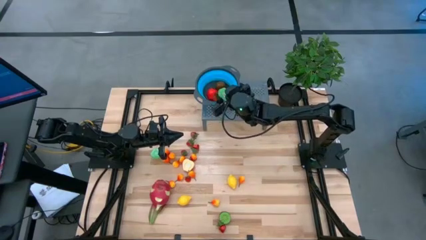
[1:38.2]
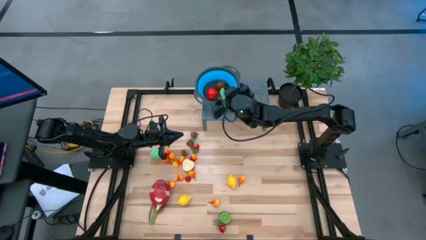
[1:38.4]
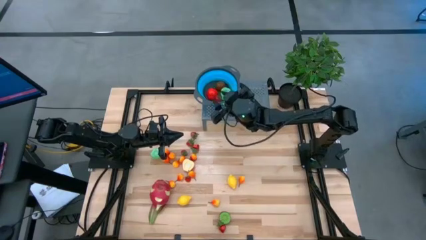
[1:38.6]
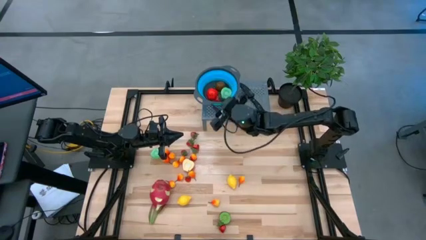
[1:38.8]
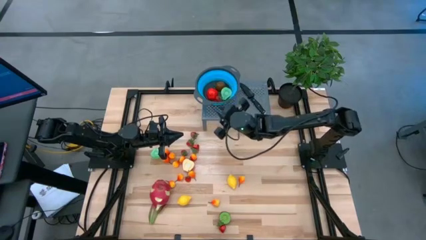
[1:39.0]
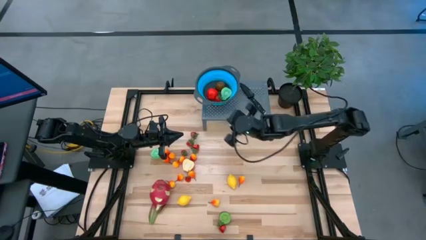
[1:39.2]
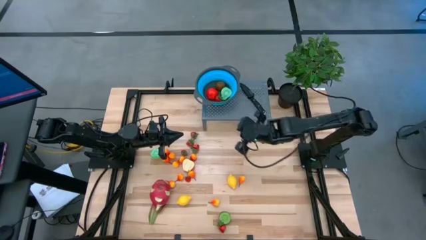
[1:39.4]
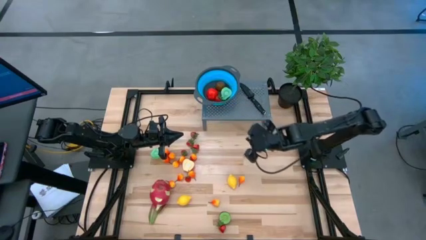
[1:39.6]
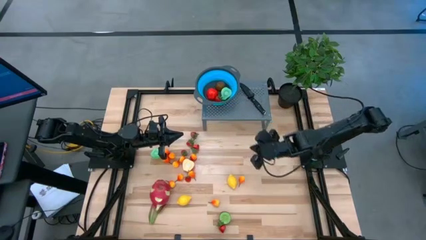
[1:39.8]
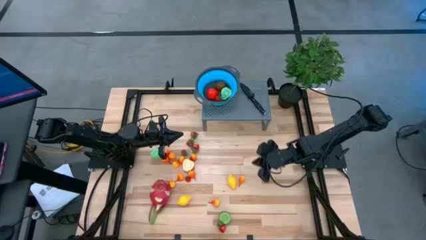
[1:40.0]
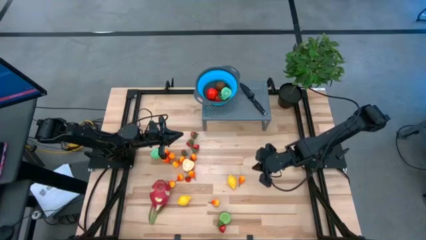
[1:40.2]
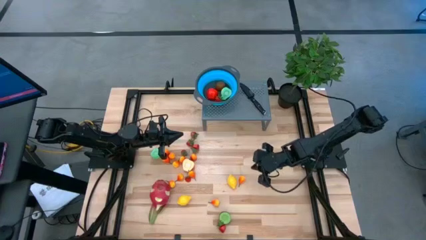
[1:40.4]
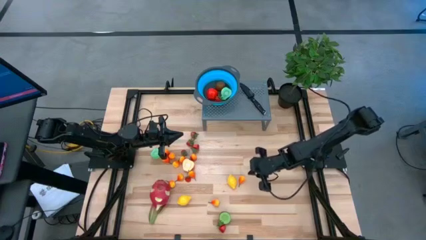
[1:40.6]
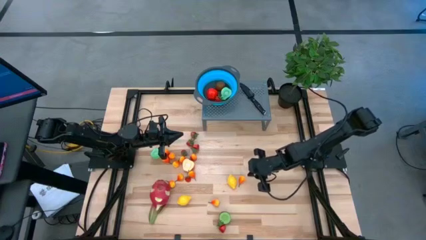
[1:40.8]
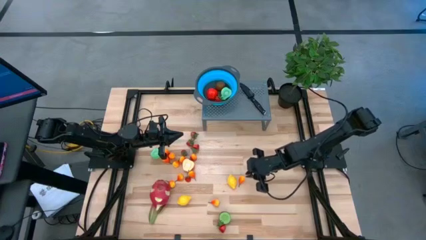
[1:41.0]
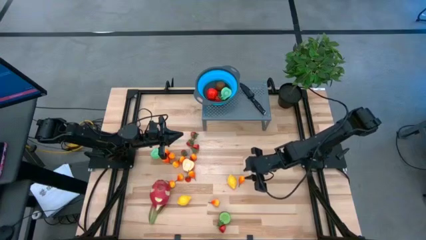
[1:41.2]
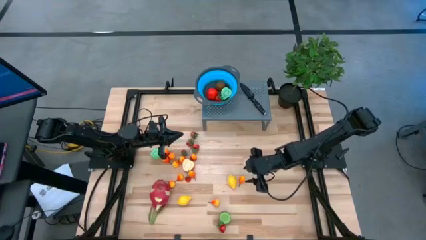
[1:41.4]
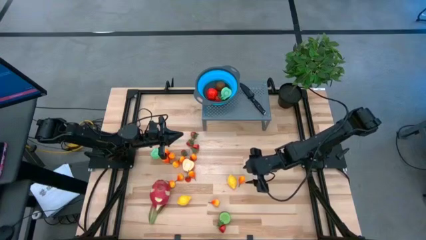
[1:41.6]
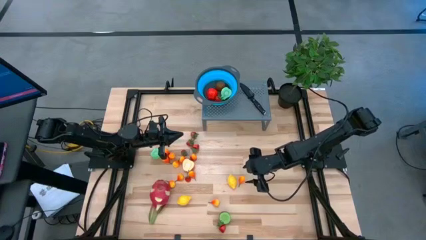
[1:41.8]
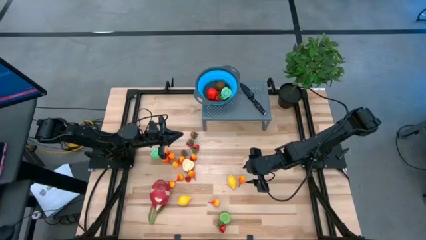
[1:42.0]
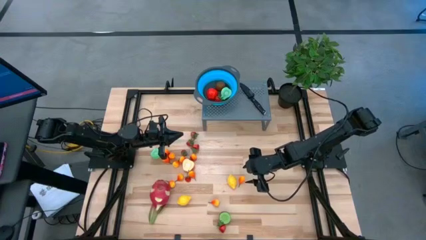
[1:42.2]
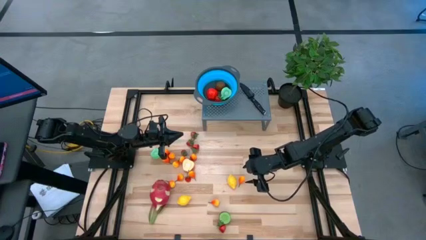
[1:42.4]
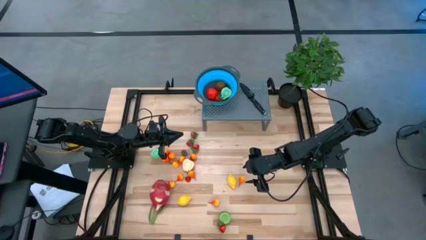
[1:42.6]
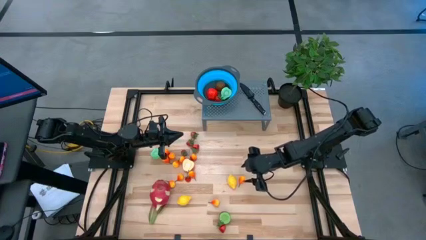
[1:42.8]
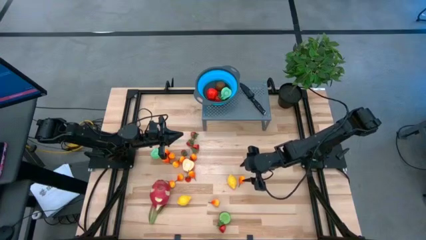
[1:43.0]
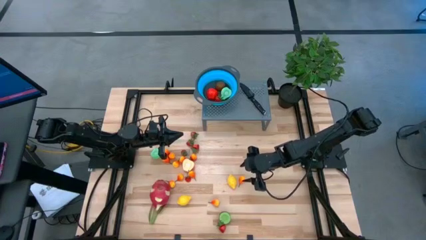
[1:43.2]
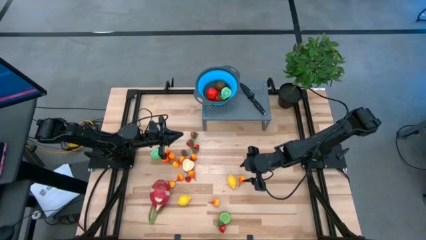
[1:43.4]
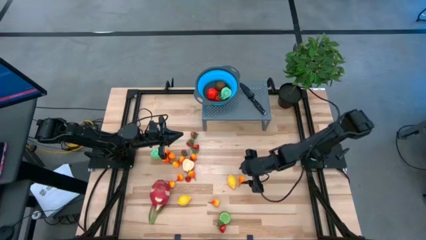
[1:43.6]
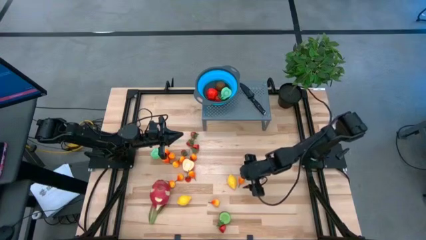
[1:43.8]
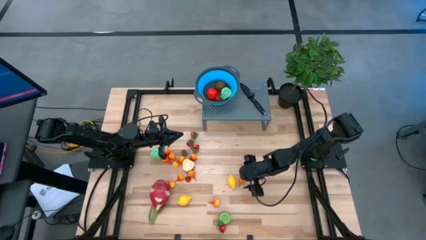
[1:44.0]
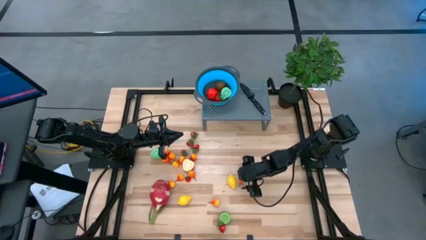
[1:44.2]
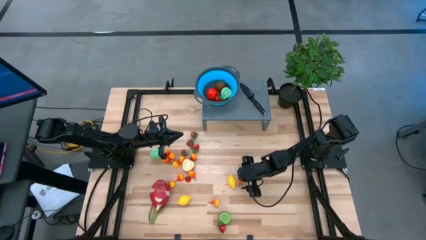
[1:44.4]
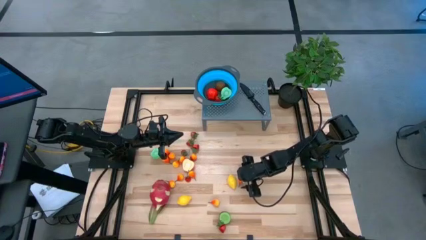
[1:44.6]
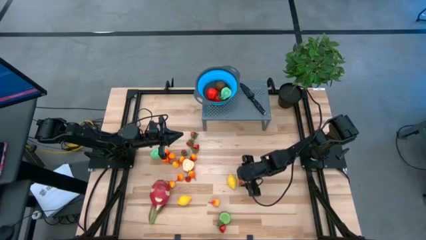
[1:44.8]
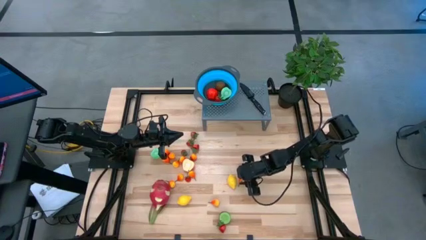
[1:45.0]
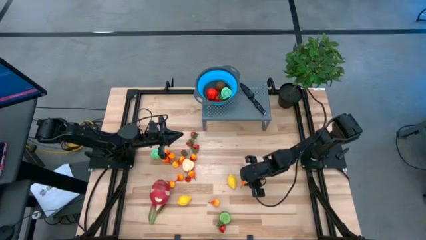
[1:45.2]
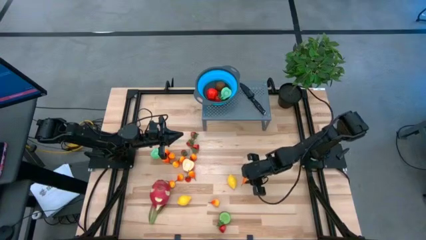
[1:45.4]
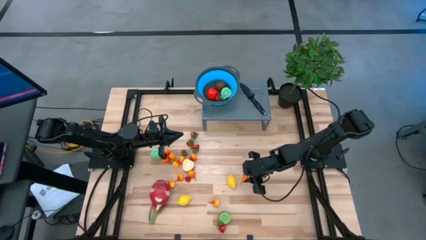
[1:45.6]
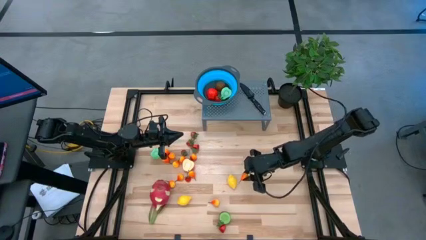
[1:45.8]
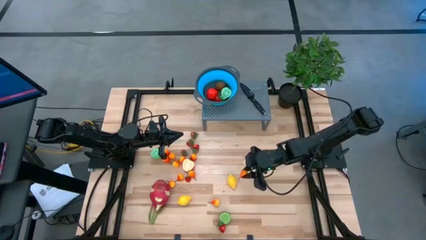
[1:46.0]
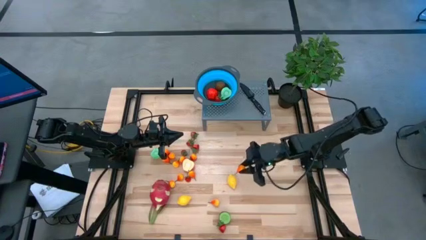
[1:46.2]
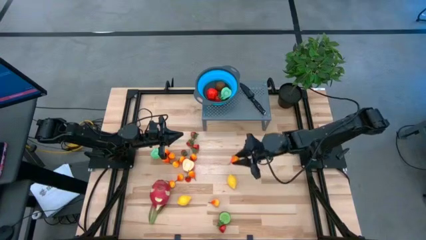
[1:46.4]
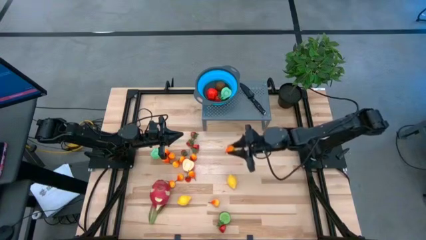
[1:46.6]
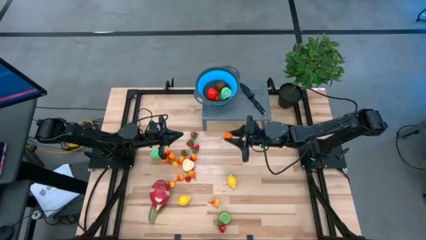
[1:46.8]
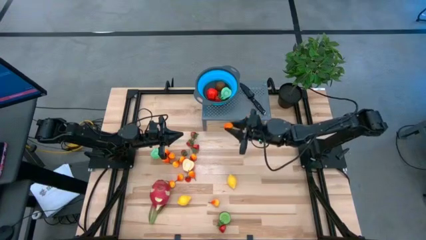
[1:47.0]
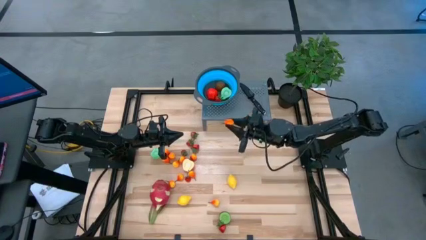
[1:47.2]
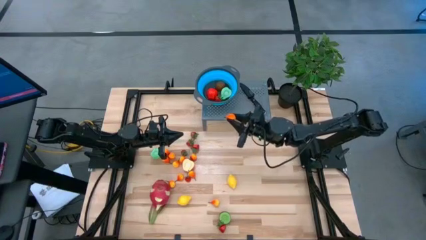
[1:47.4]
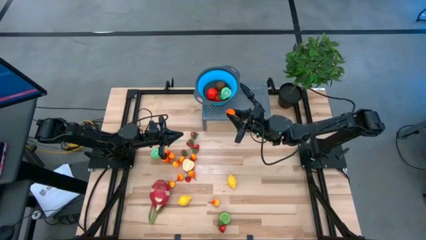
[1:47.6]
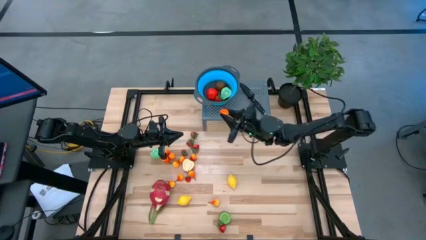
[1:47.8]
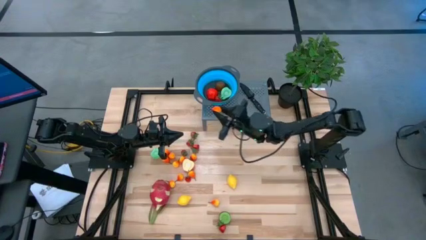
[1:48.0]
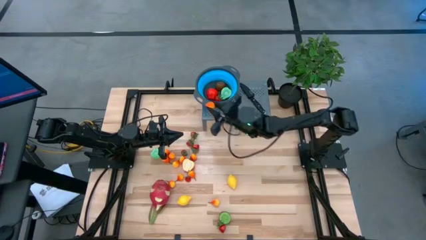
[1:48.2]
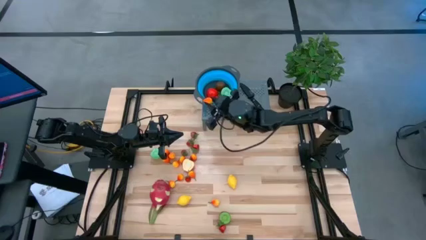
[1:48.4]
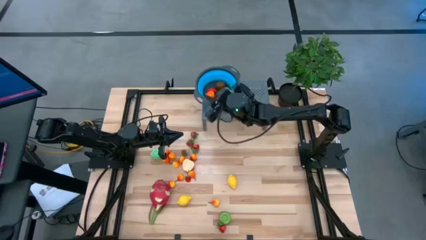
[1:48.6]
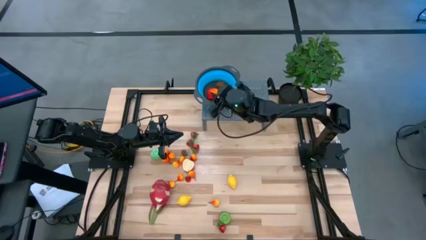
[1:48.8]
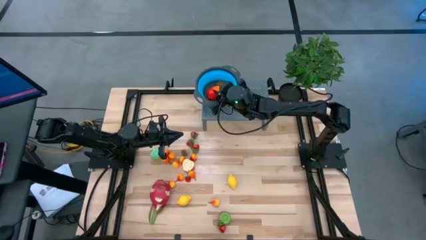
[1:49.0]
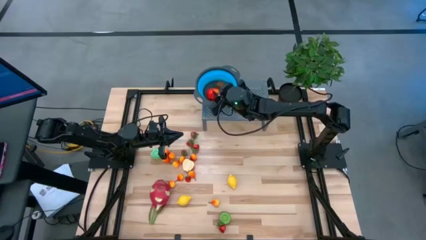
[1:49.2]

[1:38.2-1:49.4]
Task: Pick & Place Fruit
Put the yellow pear into the strainer bowl

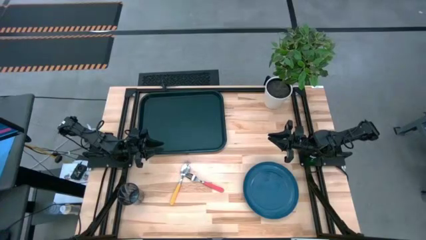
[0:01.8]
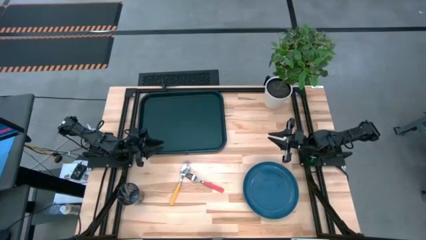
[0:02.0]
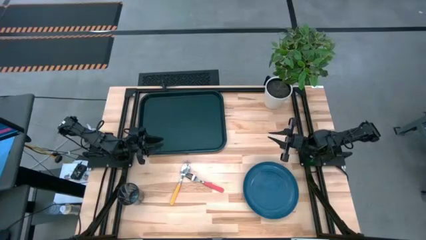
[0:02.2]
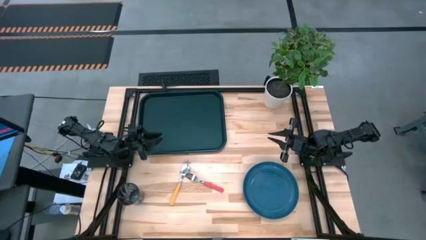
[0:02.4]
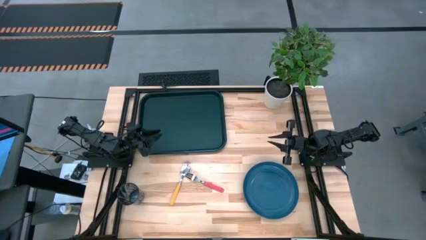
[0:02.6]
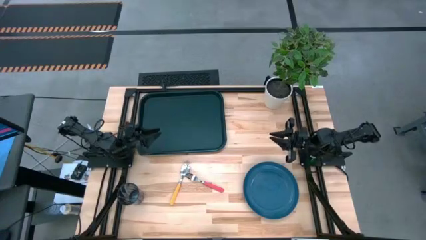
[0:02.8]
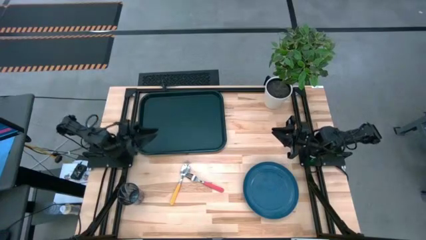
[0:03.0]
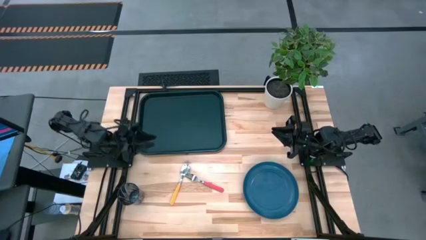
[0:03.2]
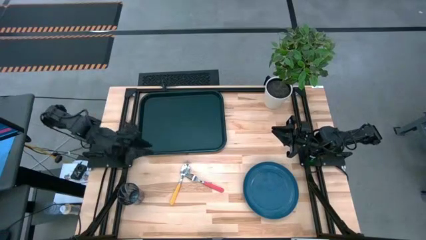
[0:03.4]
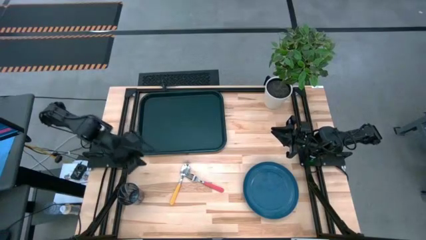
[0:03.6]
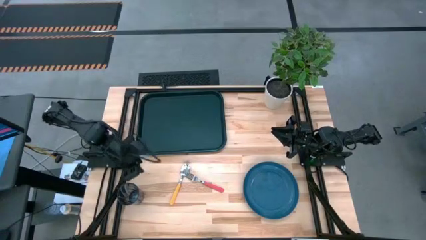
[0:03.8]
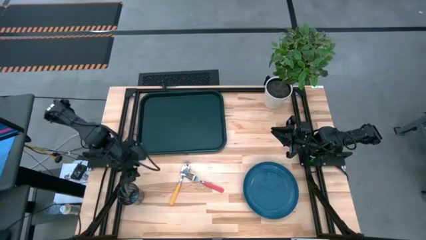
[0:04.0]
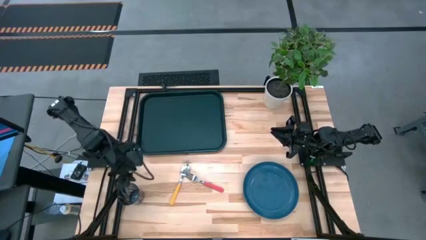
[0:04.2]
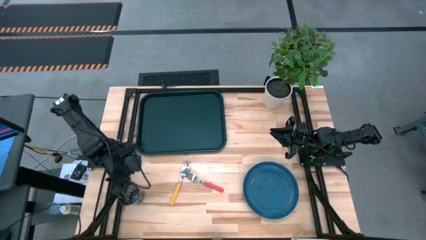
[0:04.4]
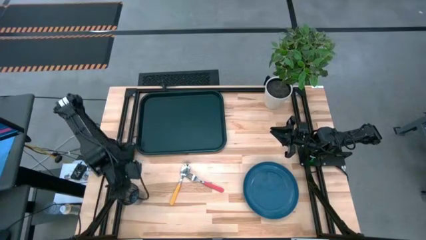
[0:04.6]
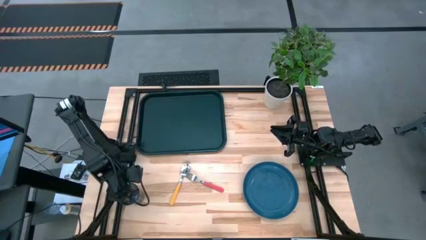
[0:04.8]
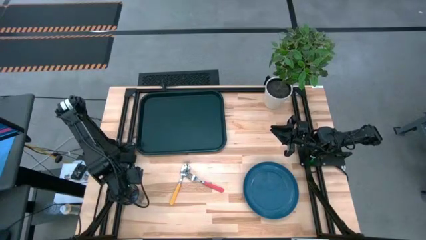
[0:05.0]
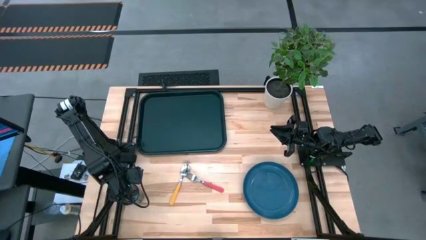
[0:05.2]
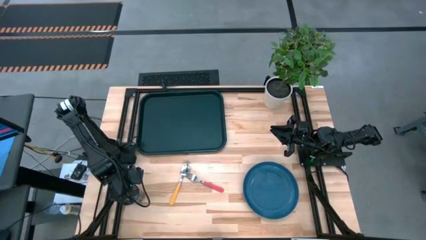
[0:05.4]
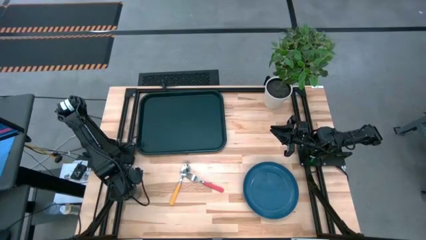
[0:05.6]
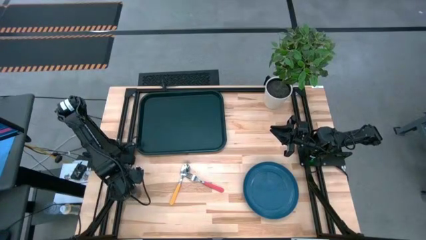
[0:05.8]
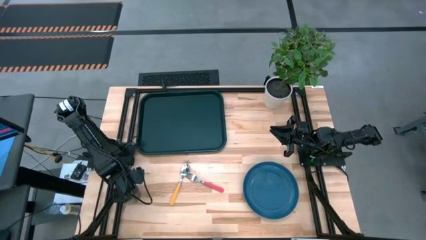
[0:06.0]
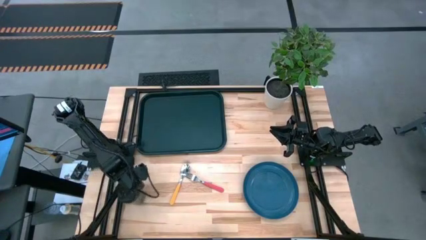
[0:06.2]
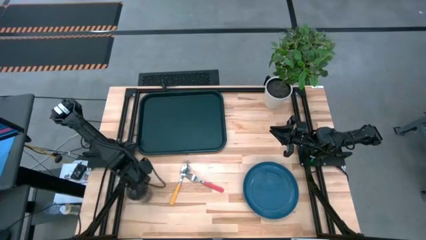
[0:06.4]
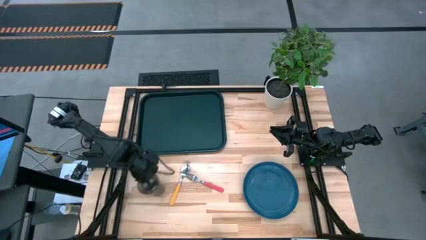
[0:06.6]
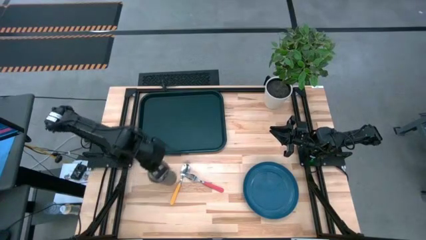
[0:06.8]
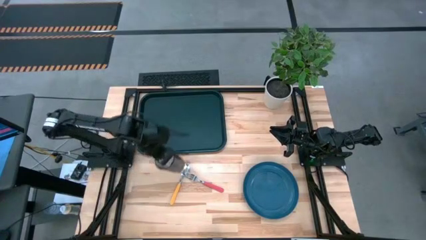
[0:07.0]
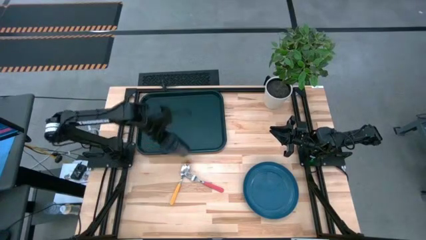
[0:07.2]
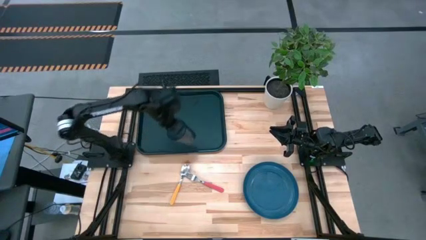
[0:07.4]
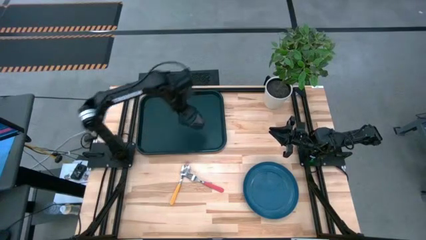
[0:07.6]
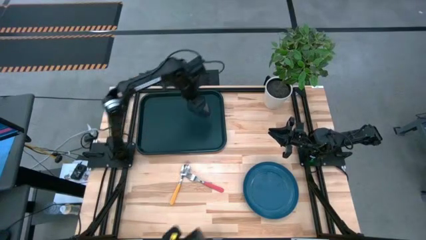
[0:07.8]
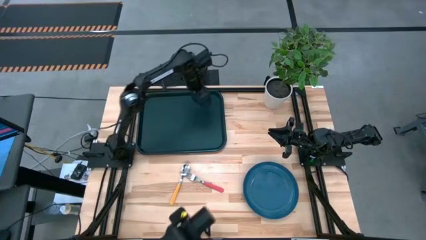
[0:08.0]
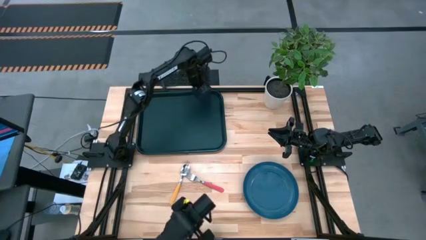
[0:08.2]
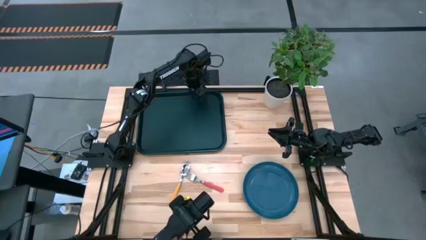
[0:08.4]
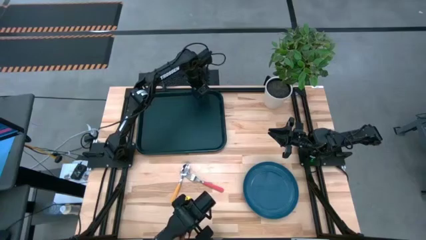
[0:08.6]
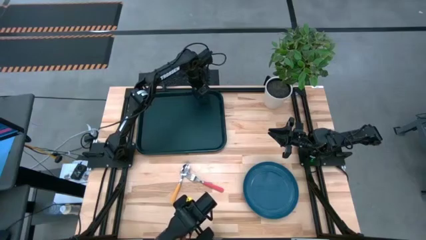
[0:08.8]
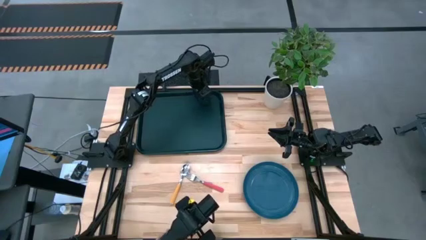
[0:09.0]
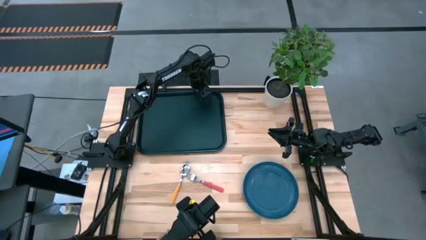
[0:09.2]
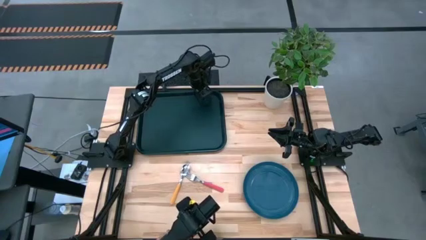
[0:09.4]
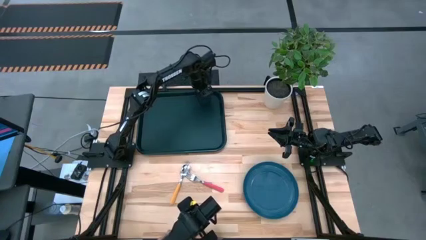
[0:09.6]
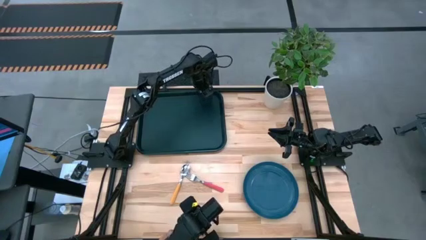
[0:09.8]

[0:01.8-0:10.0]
Task: Pick and place plate/cup/fork/spoon on tray
Put the blue glass on the black tray
